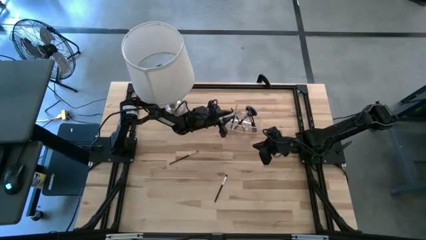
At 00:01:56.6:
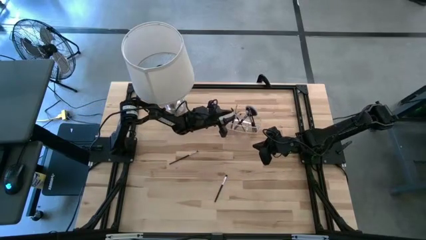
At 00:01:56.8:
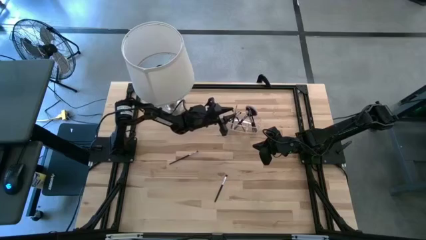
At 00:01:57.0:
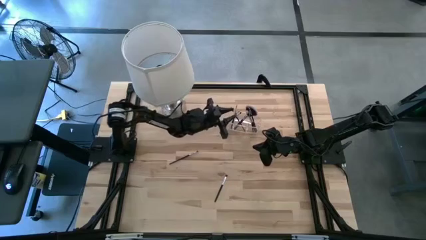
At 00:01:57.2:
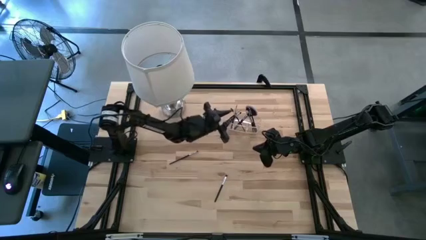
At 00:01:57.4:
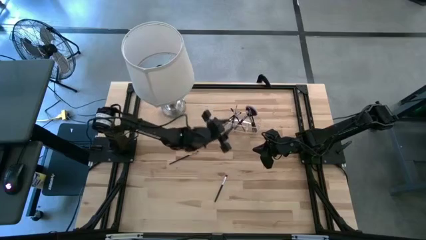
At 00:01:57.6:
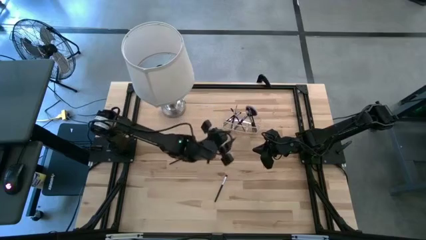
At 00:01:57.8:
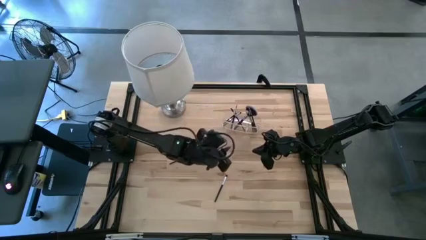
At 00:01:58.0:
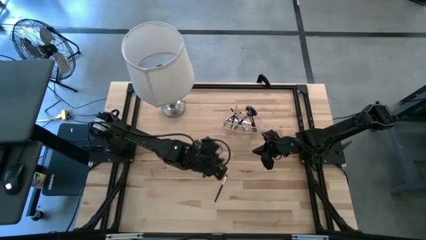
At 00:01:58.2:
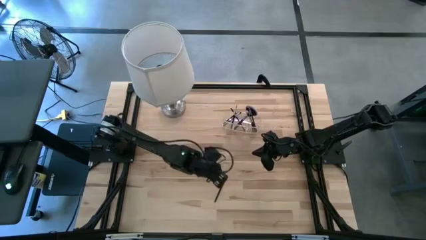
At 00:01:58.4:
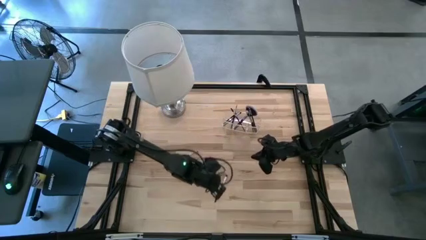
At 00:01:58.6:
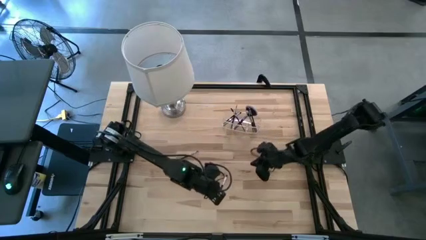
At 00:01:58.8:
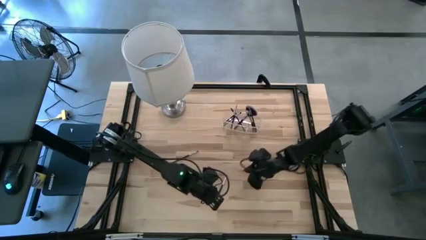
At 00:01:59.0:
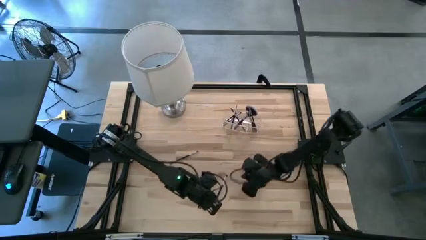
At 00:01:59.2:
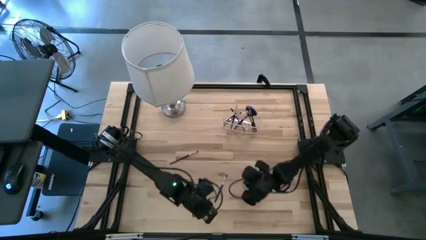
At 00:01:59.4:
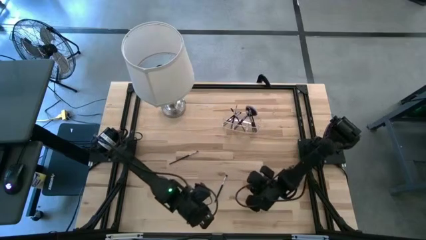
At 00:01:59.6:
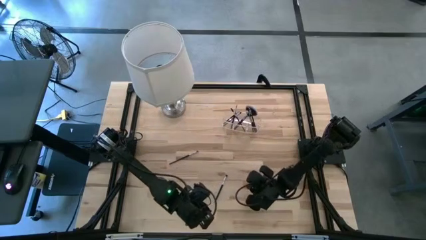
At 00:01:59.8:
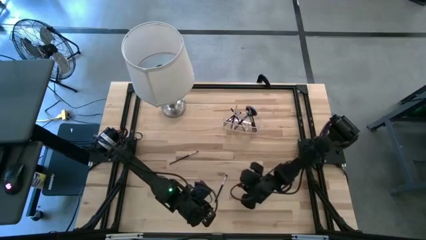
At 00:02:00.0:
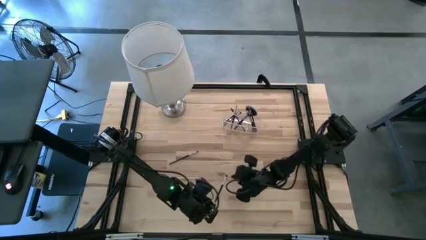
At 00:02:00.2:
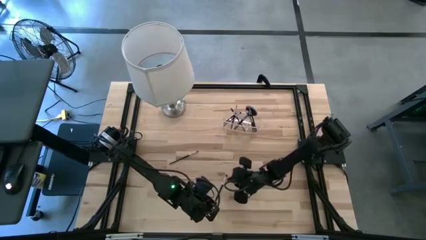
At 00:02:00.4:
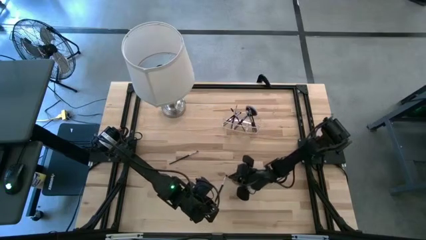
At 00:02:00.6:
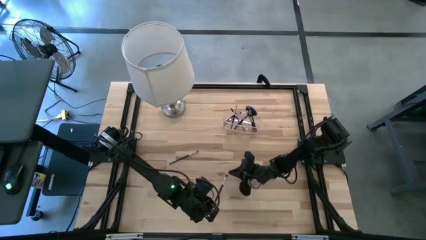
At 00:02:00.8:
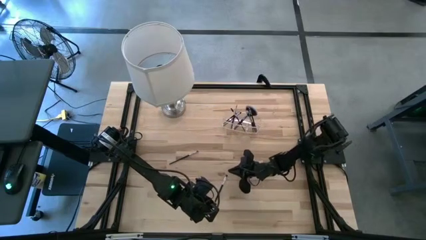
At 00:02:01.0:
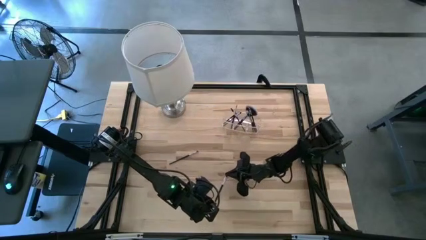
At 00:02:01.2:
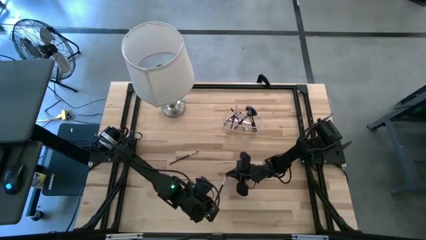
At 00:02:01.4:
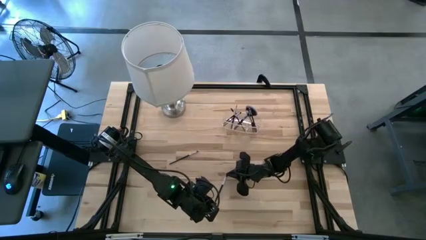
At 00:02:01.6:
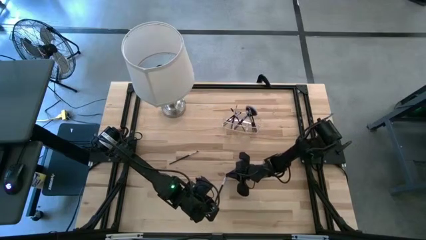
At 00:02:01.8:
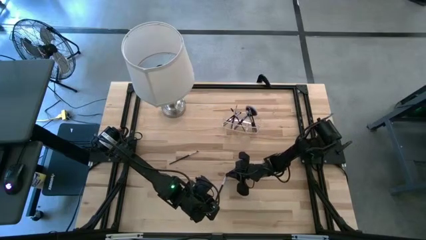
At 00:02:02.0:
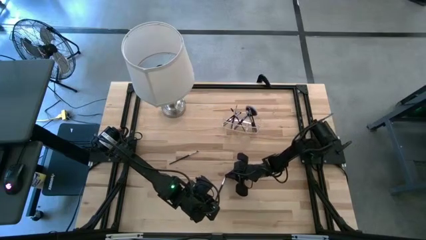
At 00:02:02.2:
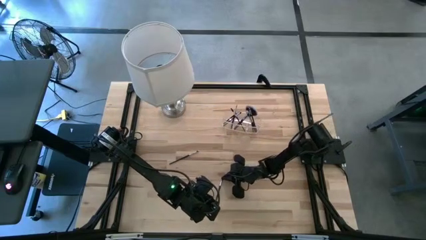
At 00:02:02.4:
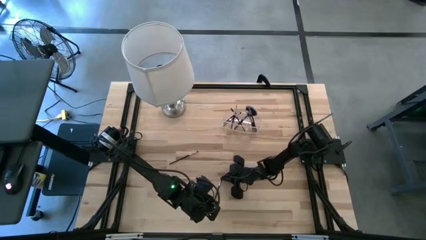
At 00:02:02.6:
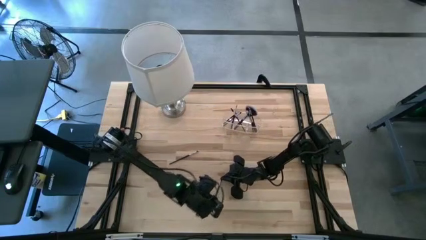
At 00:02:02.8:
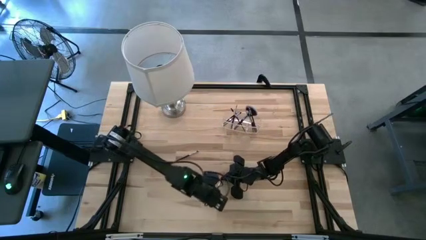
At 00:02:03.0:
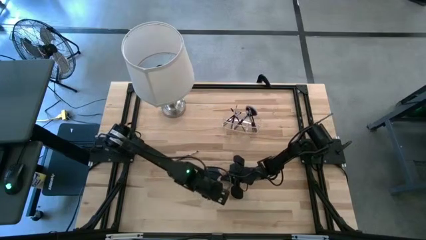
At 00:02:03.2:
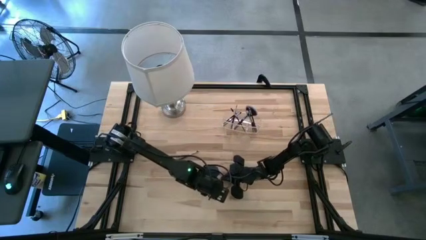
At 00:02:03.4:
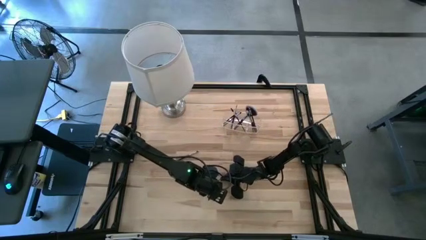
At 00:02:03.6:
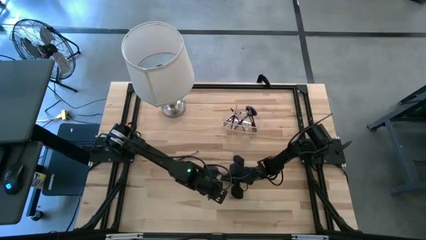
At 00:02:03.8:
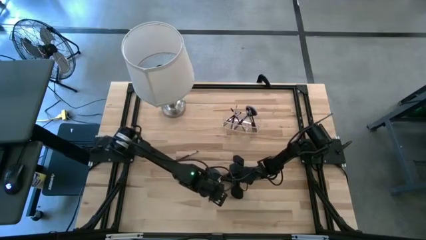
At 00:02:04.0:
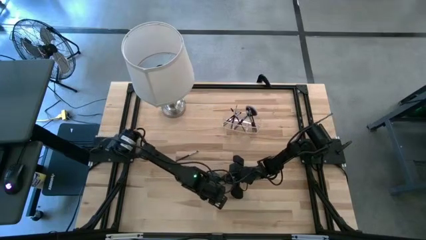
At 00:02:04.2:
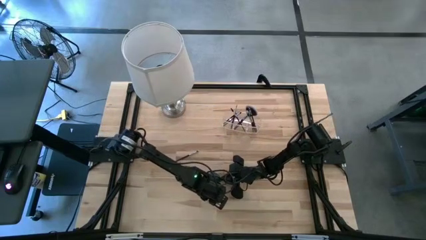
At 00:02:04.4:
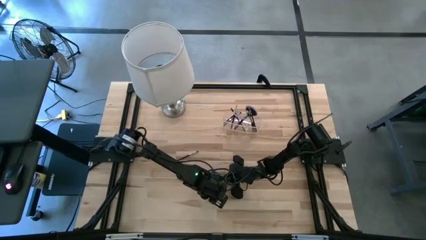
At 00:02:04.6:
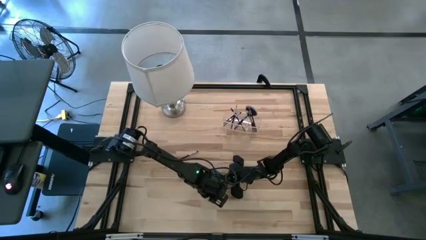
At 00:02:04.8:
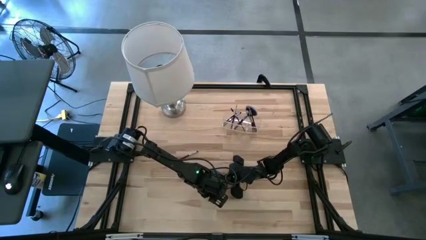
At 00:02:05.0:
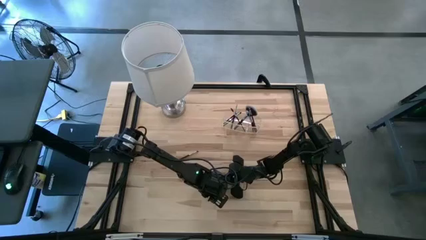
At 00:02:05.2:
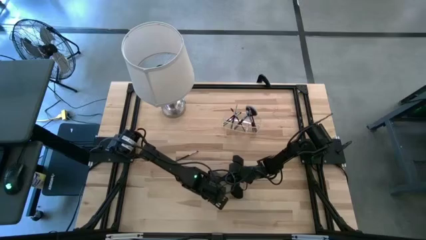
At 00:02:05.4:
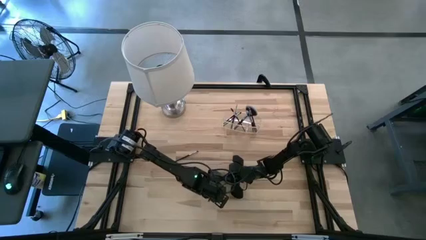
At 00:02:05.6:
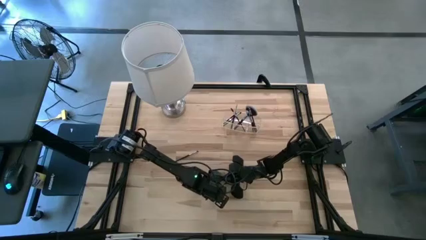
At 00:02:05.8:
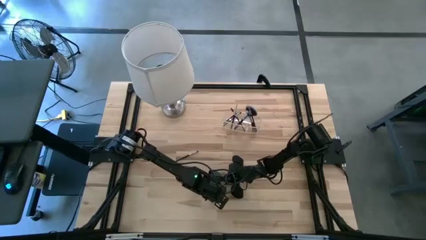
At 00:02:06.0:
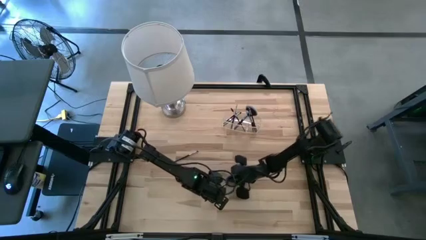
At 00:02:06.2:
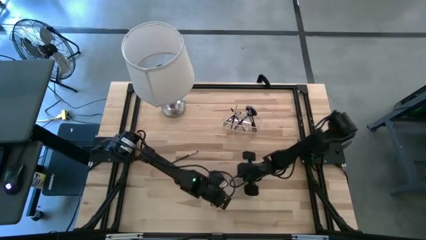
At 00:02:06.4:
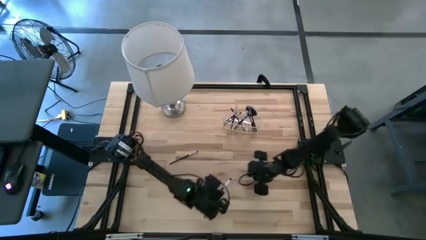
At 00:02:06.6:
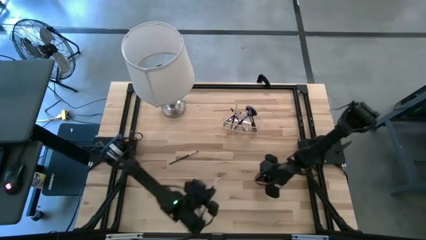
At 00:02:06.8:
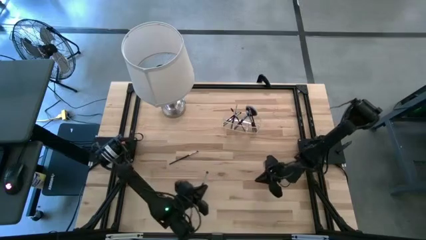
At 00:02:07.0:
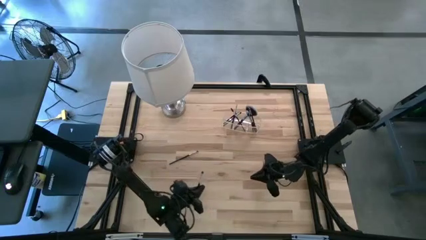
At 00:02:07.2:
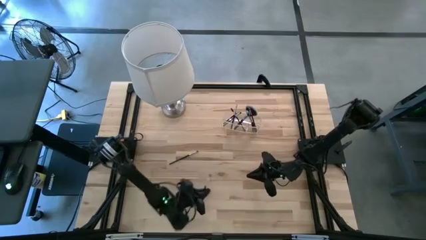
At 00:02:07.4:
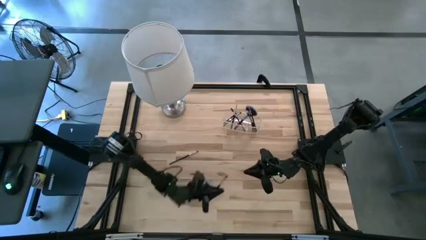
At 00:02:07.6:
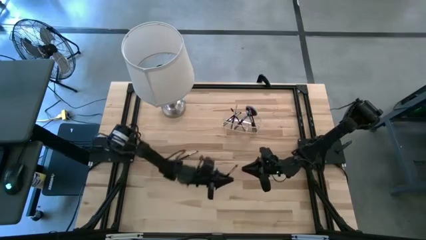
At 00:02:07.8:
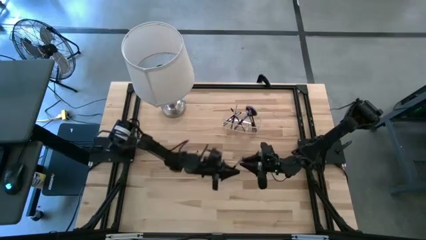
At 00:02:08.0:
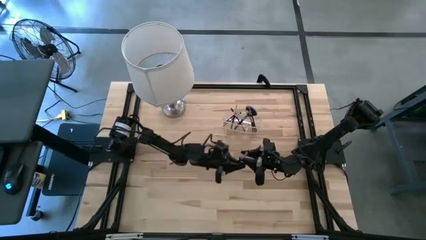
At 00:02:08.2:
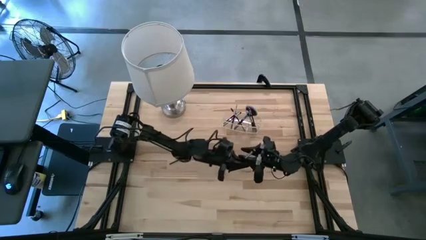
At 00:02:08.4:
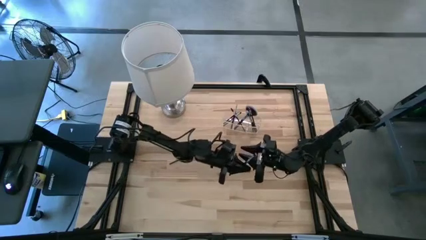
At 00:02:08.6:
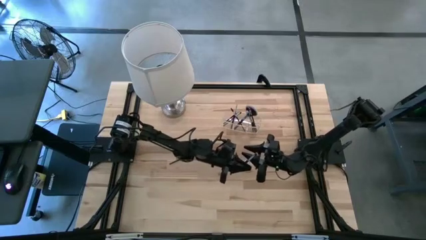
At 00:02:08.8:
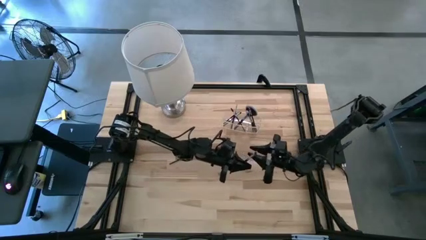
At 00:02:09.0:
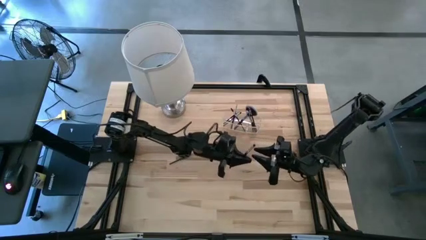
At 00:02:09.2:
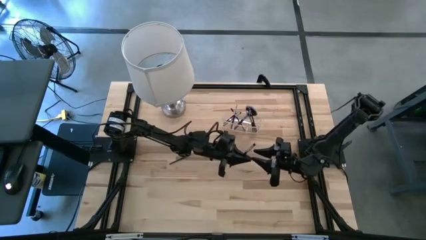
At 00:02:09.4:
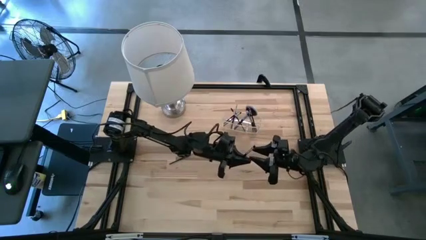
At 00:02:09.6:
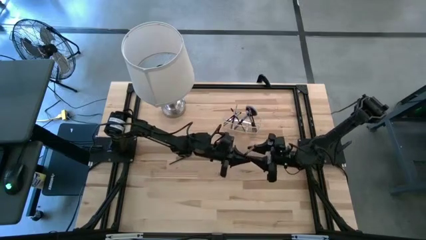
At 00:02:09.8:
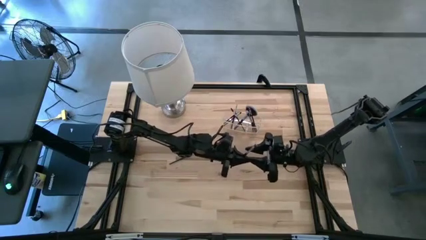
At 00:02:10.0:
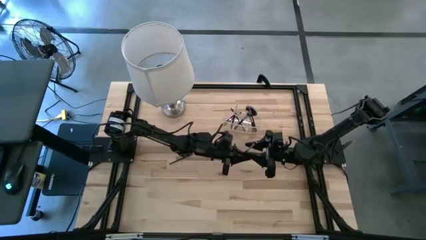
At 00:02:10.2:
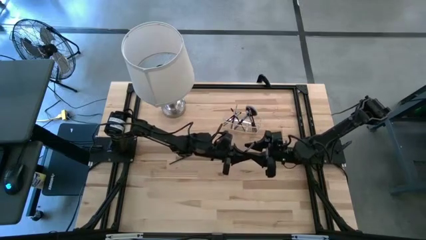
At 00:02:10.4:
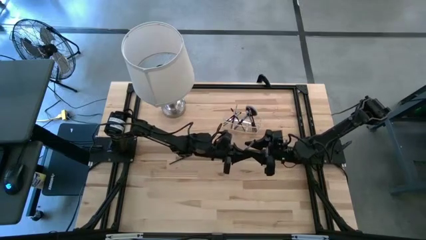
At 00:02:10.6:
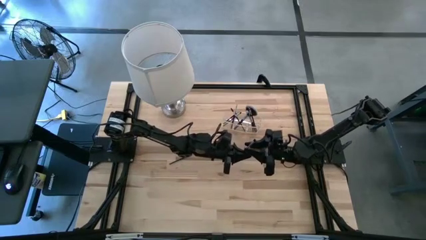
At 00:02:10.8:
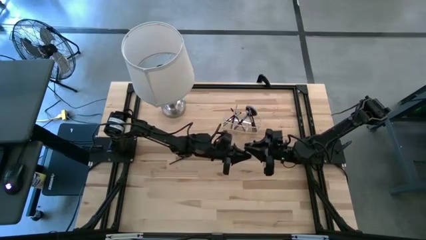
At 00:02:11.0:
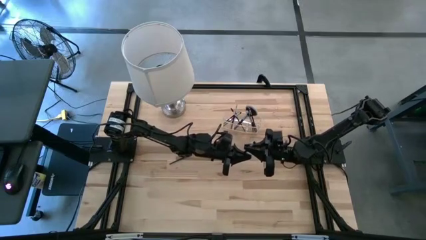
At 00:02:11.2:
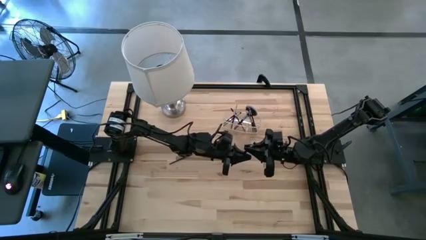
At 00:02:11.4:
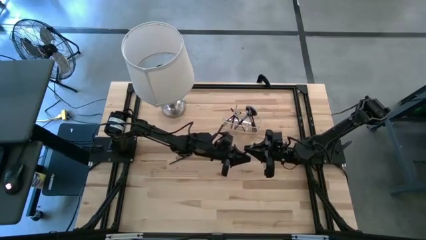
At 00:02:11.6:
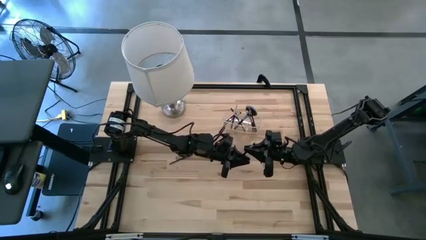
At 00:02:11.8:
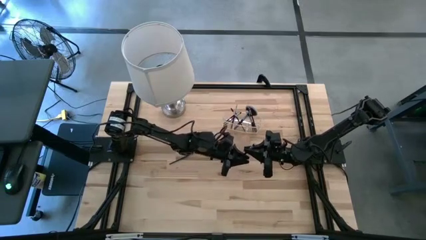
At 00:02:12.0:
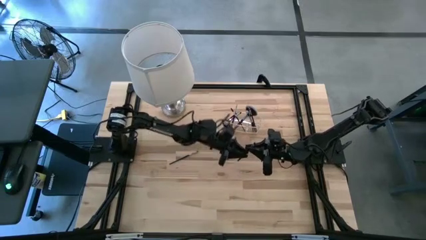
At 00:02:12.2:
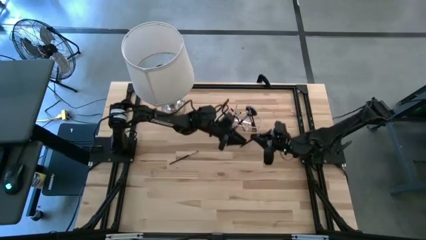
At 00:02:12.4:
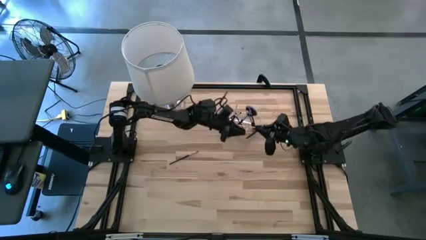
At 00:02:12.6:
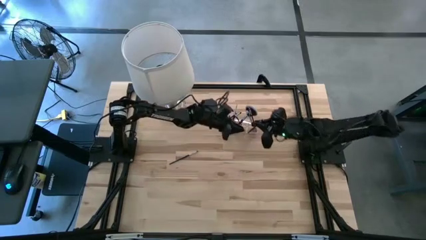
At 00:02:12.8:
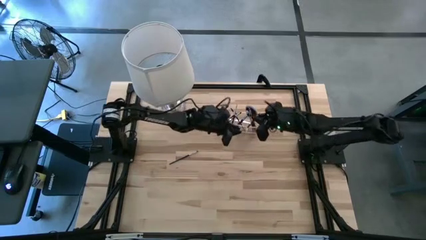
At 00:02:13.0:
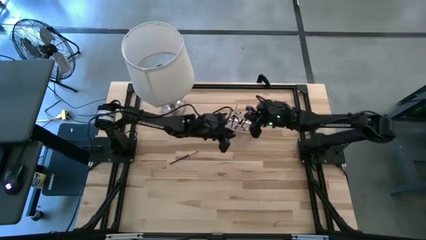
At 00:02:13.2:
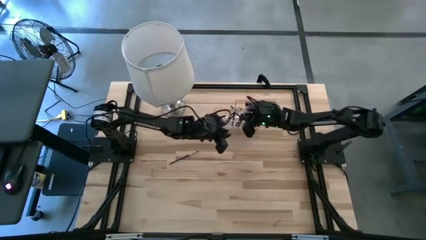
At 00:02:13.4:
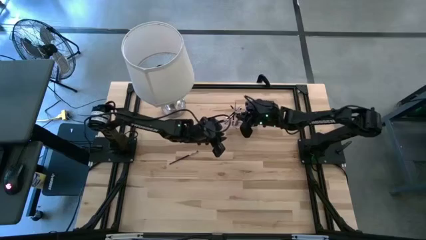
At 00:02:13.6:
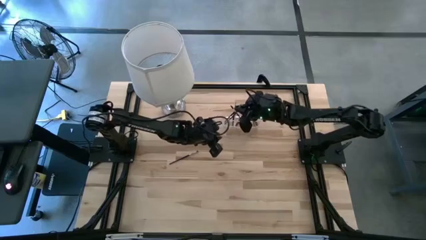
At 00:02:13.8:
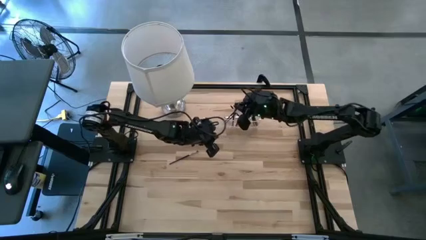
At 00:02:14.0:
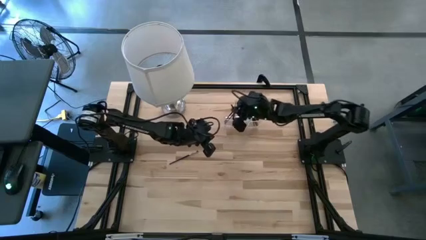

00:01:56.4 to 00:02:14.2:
Task: Pick & Place Makeup Supplies
Put the makeup brush into the transparent organizer
